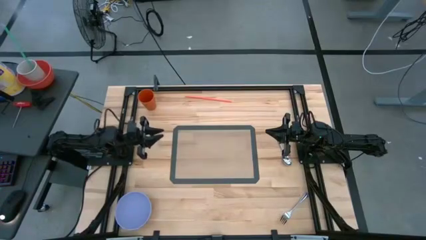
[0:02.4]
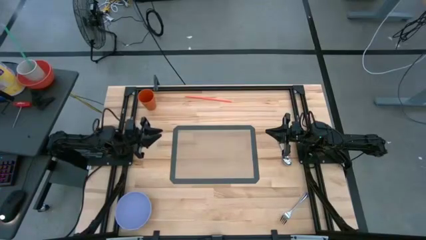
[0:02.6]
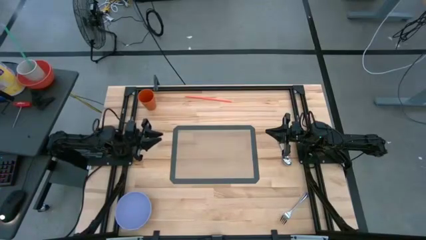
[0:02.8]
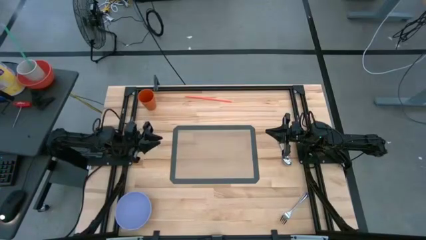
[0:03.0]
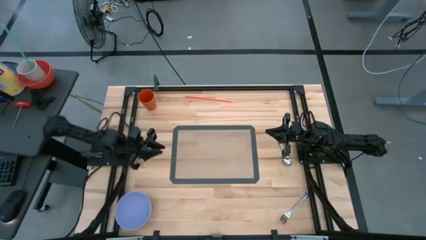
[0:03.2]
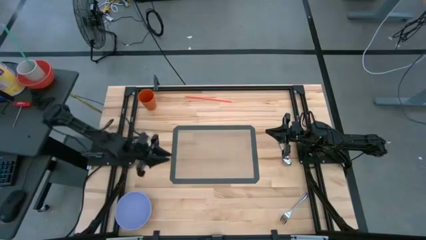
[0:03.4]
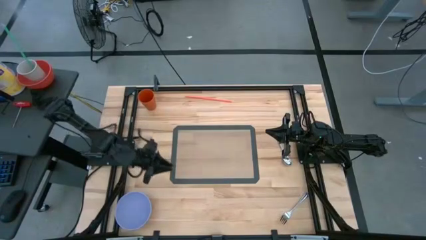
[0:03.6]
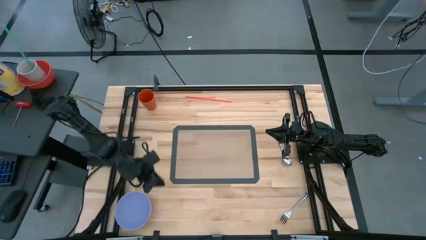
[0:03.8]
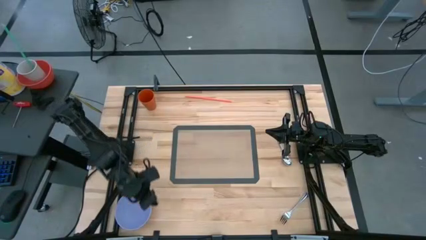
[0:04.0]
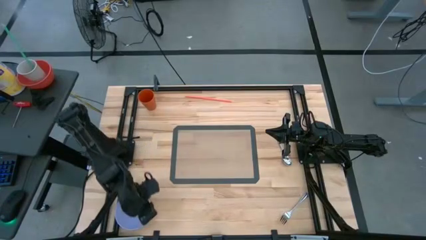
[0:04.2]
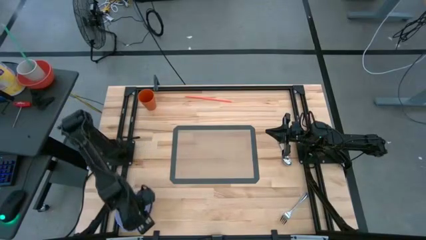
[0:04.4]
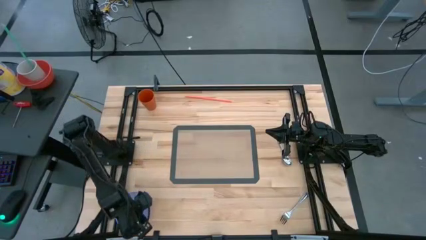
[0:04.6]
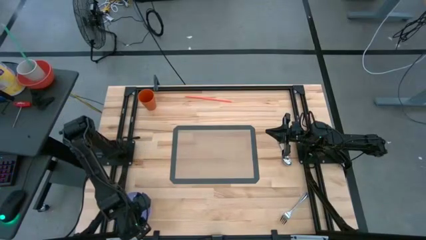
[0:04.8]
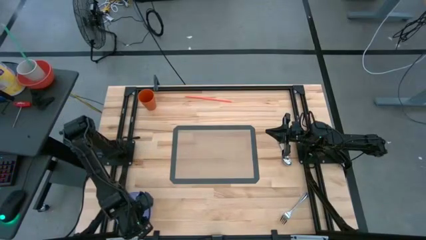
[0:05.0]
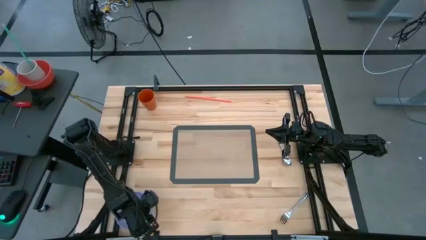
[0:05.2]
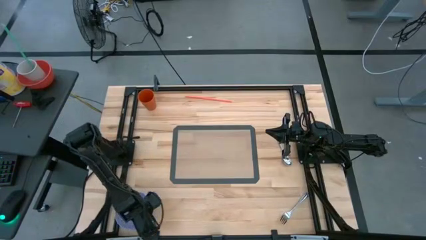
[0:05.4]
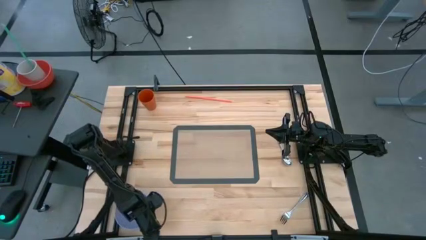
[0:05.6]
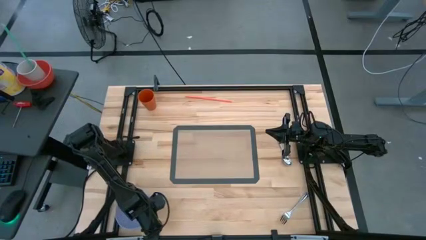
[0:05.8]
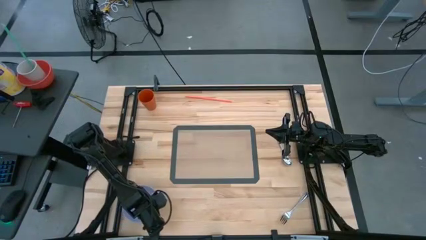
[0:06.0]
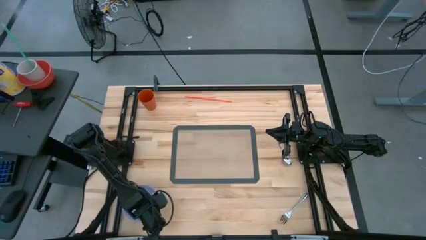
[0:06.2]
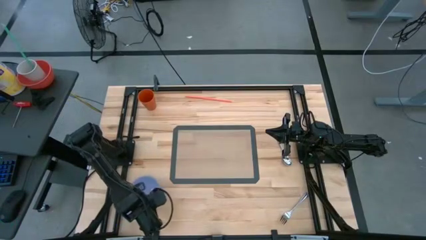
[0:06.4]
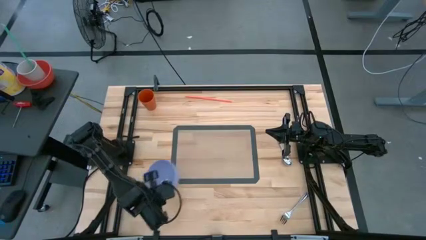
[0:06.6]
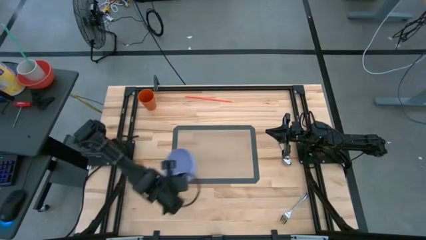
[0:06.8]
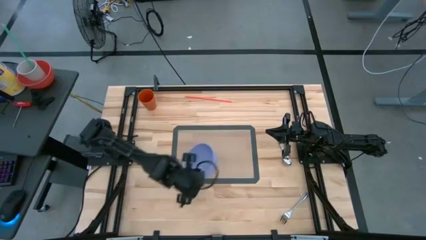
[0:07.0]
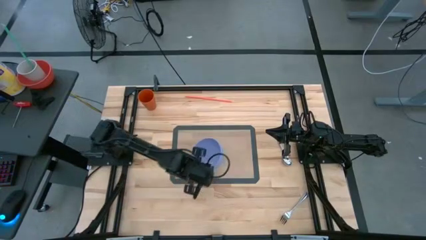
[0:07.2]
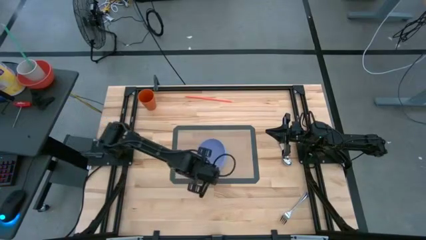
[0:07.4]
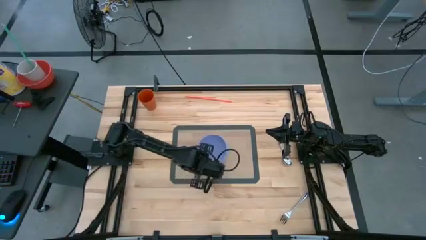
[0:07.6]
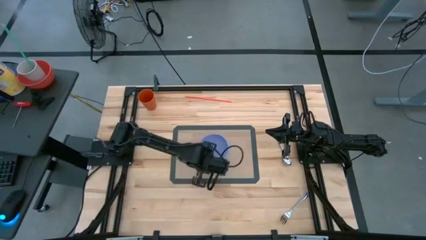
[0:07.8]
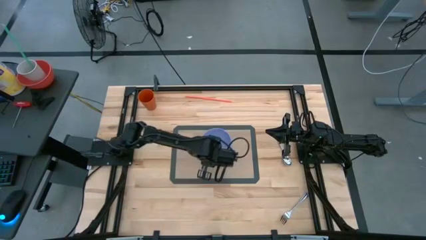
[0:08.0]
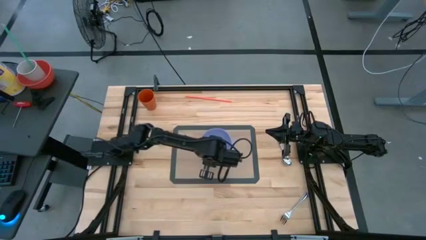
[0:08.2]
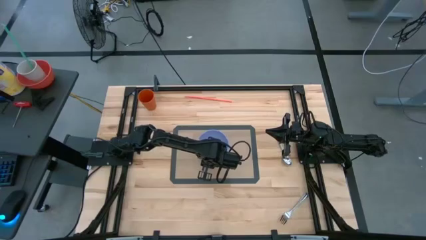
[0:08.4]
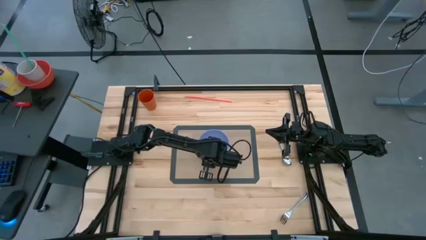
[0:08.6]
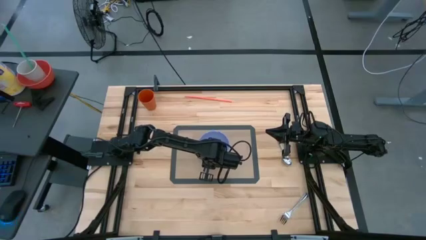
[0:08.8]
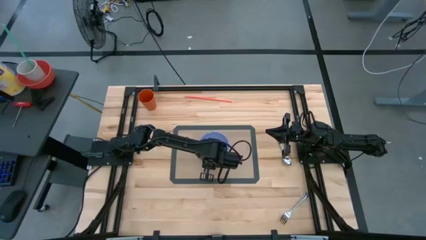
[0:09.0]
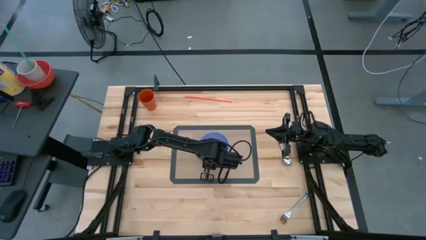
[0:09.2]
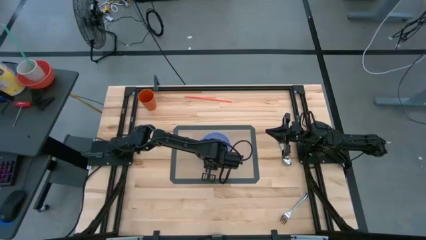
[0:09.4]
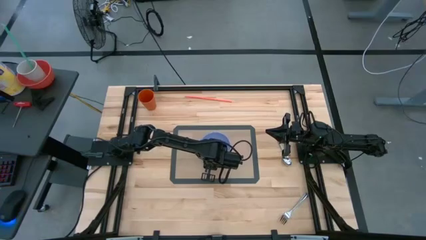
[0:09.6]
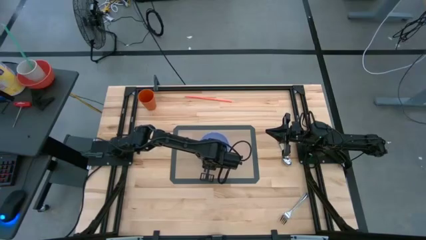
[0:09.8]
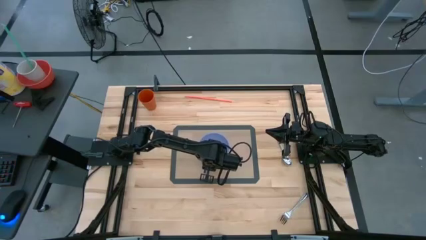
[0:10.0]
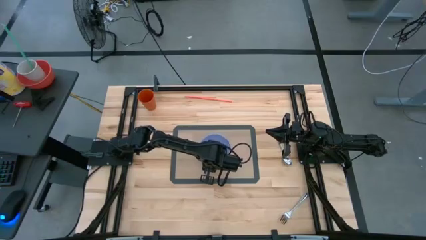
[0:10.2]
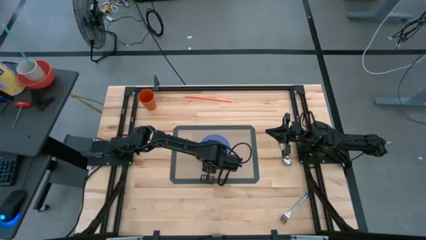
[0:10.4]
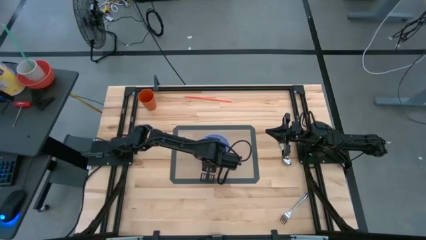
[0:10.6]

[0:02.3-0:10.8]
Task: Pick & Place Utensil
Put the violet bowl on the middle of the brown mat

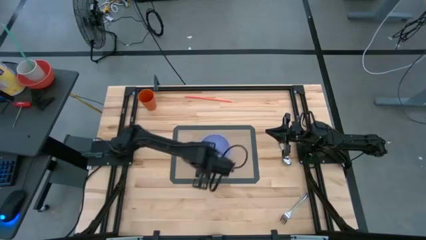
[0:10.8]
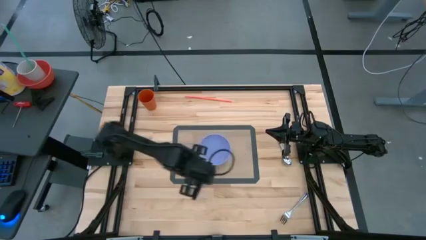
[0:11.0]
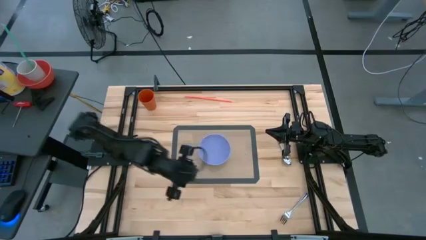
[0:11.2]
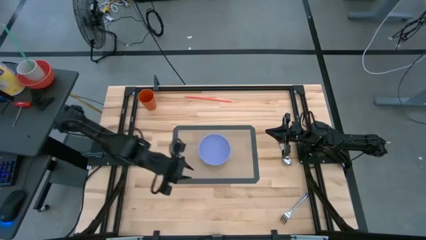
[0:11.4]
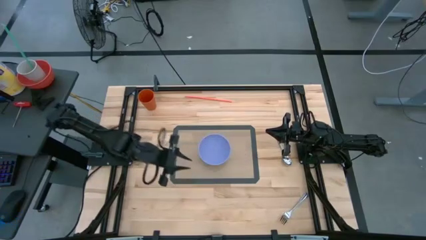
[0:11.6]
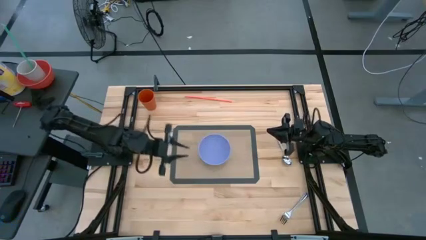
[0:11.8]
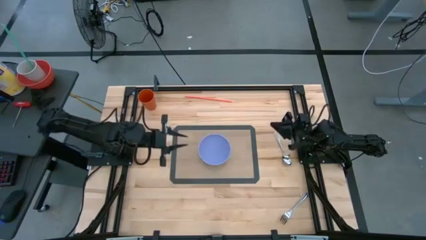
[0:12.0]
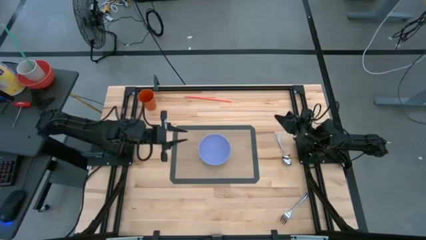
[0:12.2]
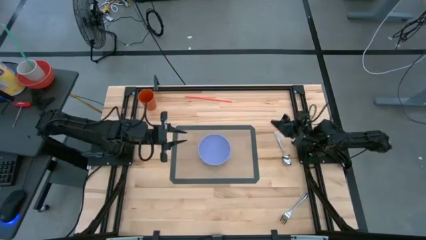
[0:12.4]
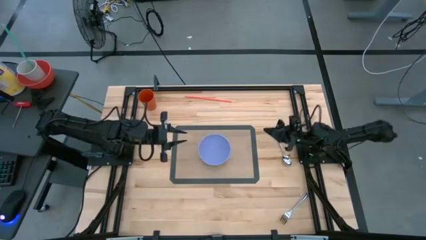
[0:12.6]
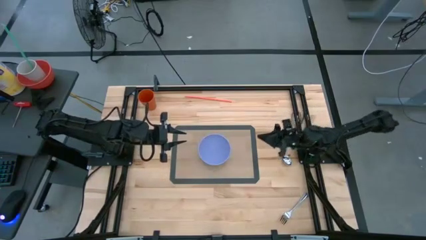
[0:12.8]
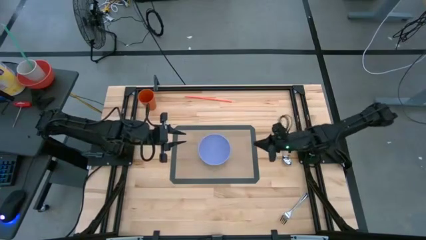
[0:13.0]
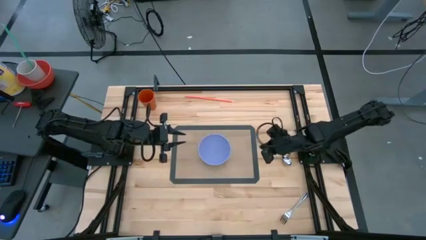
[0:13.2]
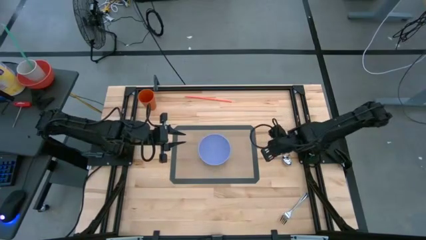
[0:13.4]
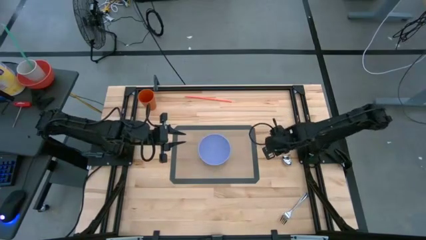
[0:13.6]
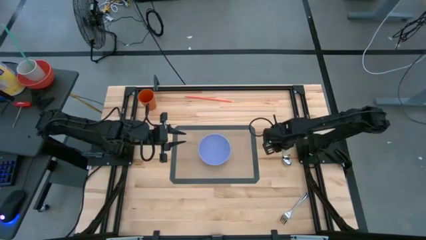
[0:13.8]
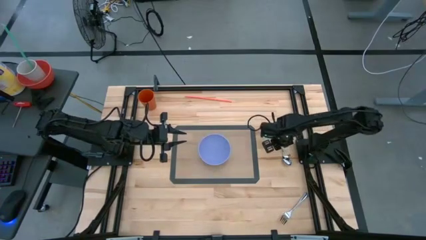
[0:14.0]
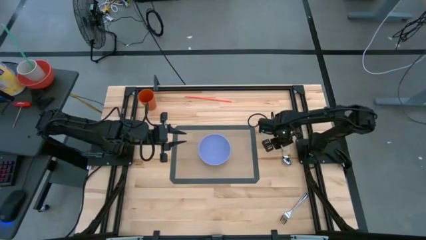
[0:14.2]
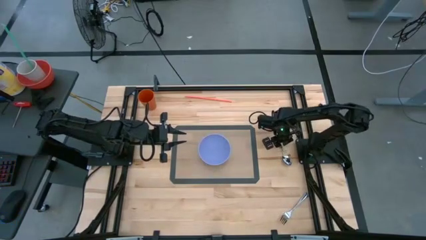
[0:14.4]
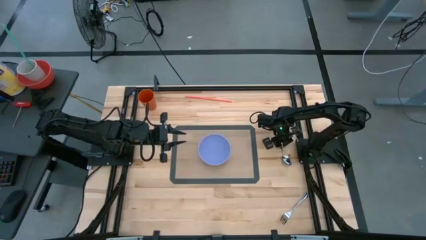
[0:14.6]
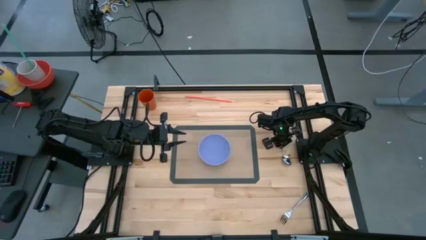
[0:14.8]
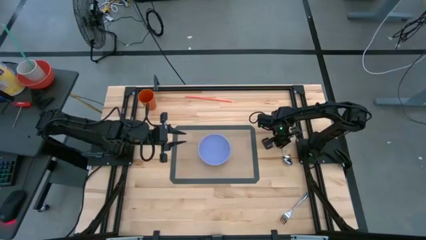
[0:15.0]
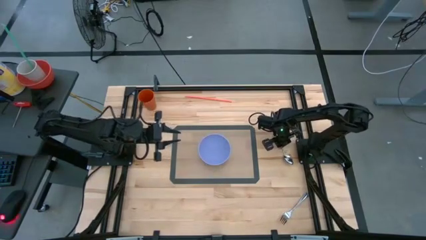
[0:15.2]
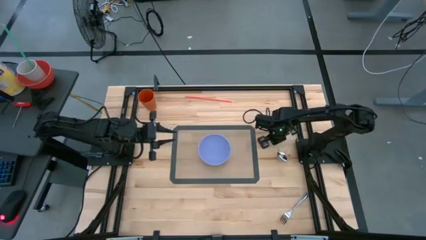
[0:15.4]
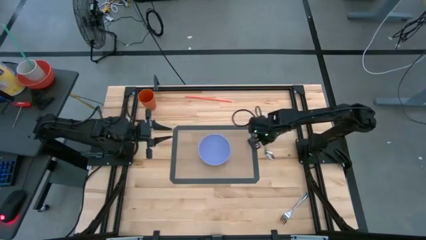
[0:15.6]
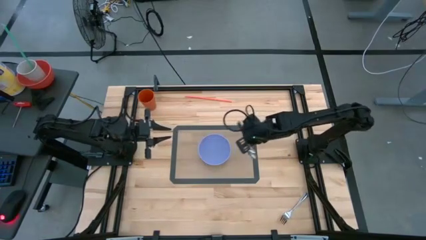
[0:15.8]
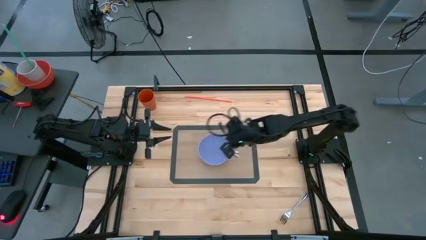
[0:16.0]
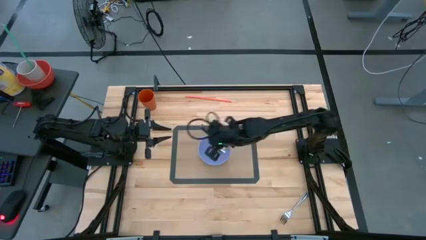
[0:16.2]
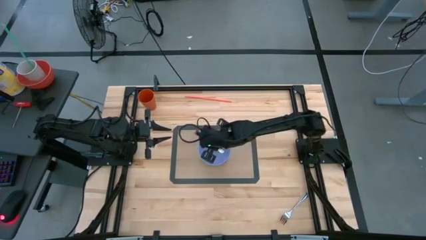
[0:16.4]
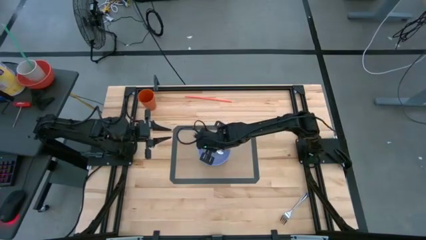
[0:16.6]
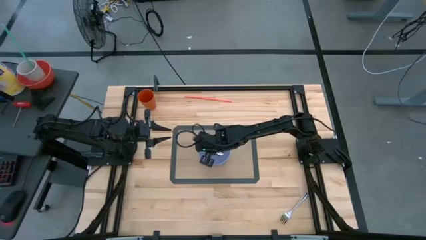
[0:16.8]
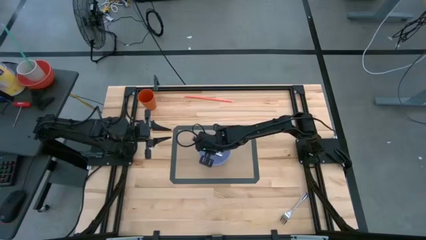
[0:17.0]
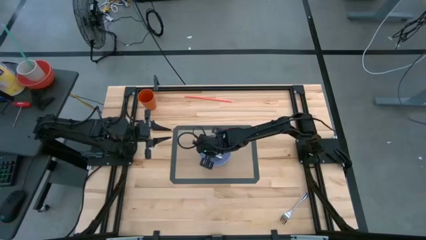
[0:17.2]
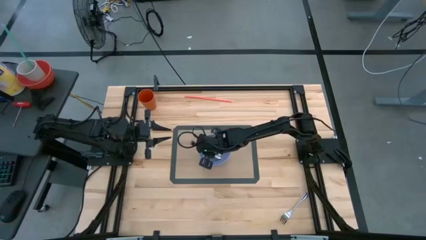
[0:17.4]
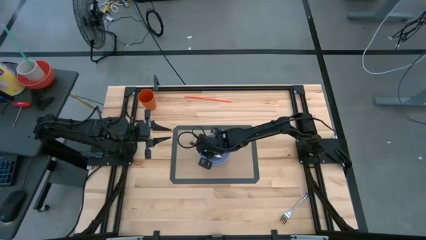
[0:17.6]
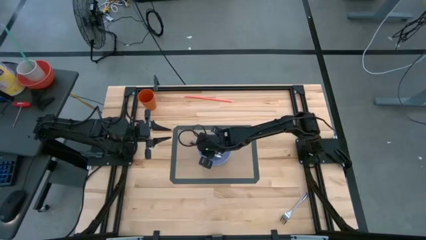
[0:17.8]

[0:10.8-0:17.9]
Put the silver spoon into the violet bowl

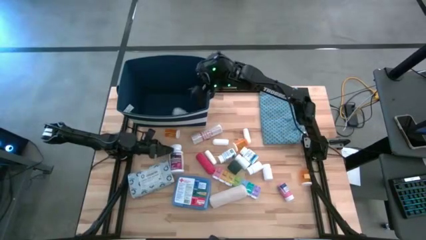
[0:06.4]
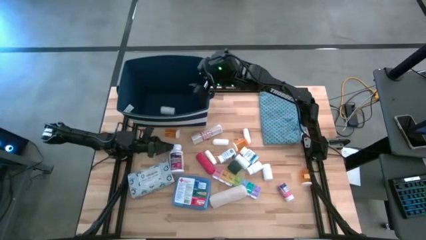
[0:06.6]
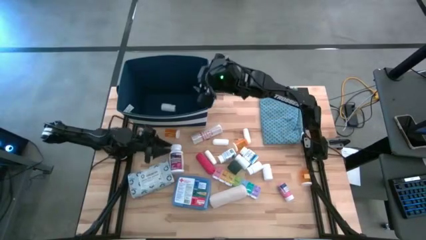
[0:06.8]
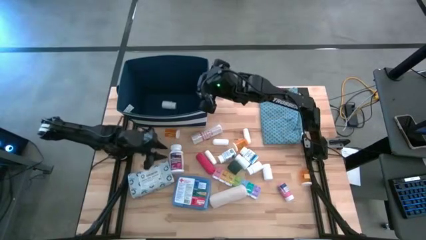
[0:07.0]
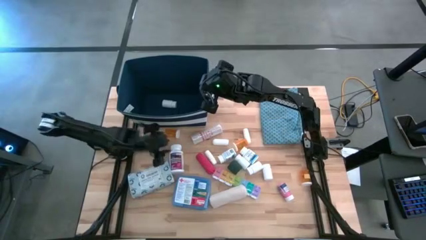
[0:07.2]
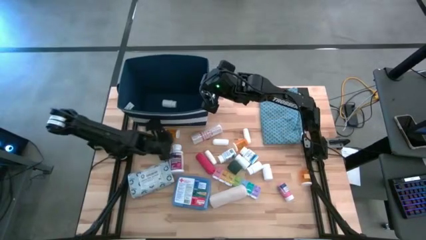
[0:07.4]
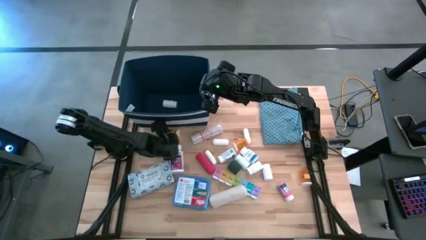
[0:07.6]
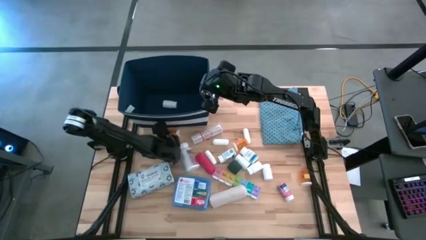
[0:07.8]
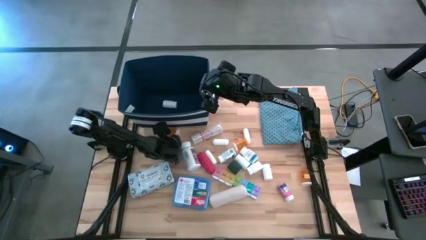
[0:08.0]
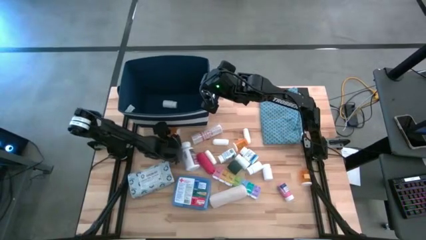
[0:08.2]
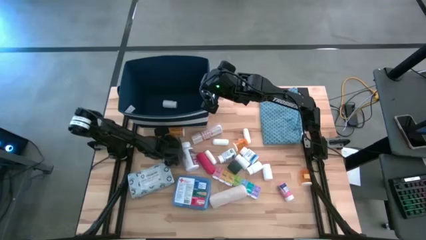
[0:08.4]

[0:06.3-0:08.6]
Task: Pick & place medical supplies in basket/bin
Put the top orange medicine bottle into the blue bin
